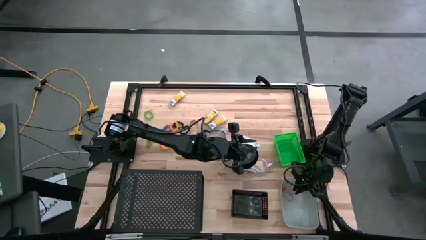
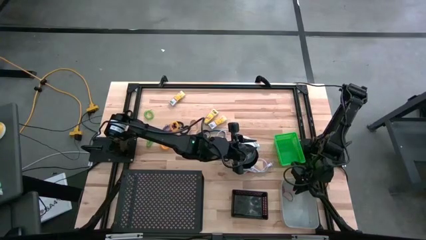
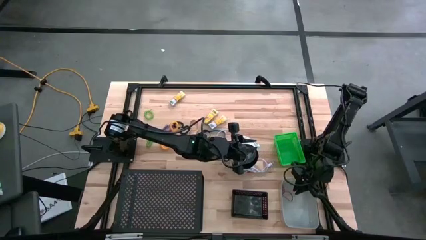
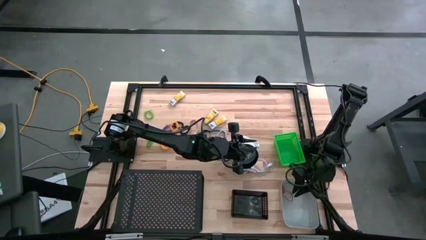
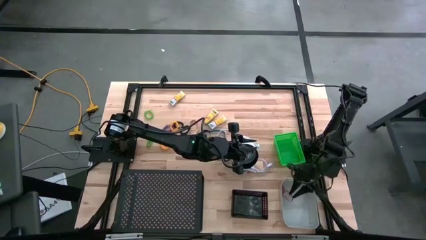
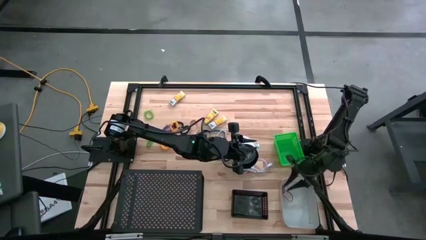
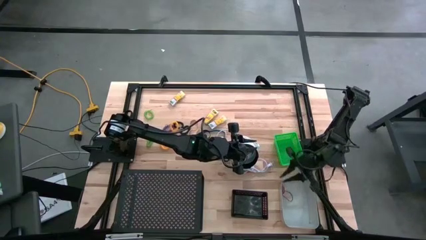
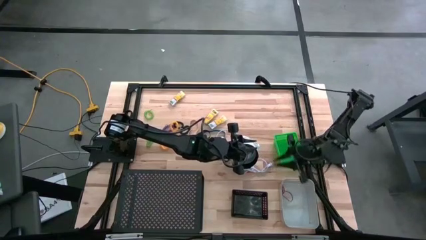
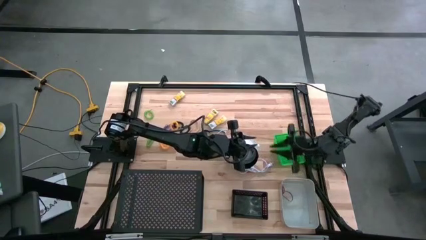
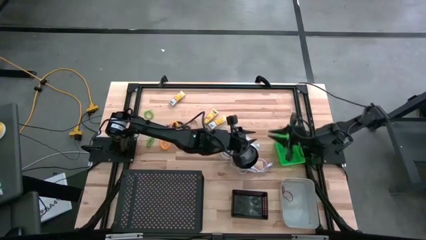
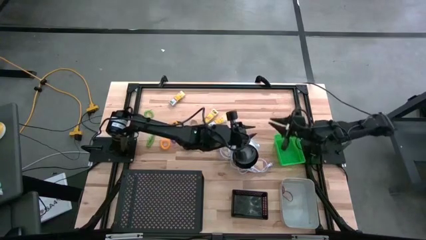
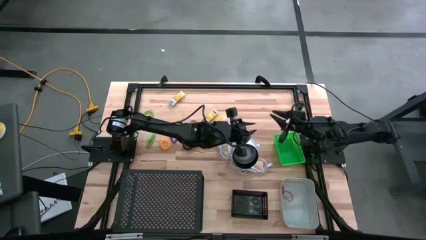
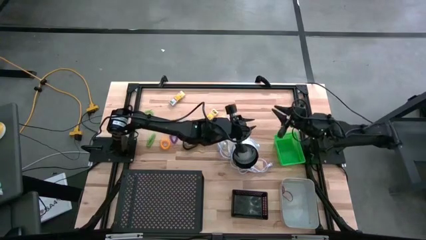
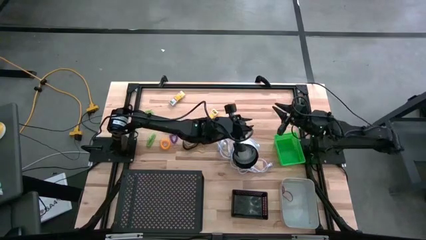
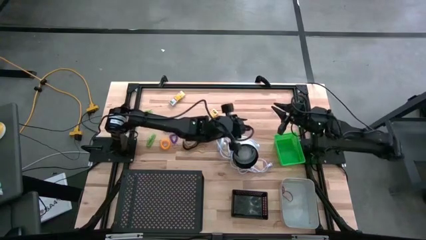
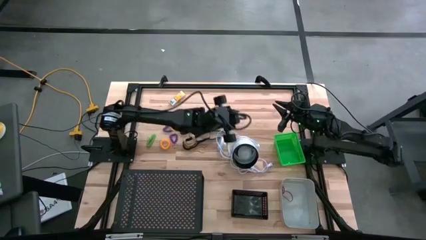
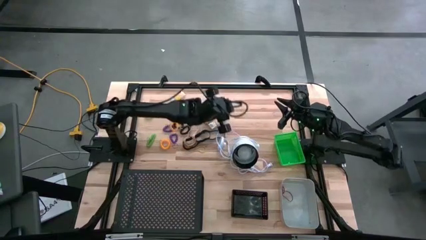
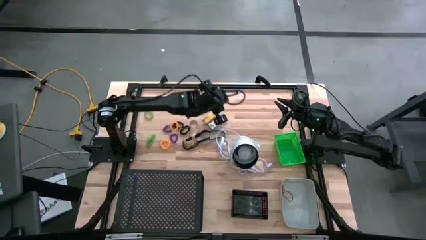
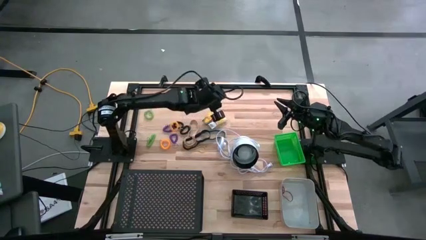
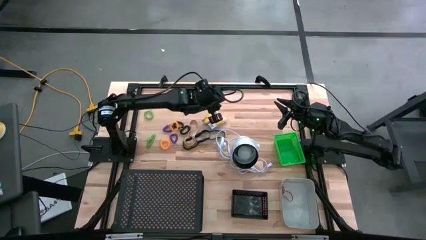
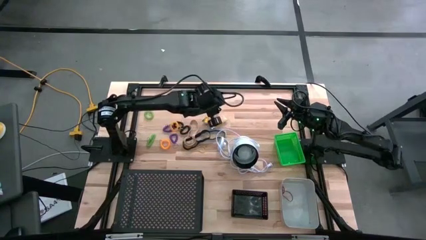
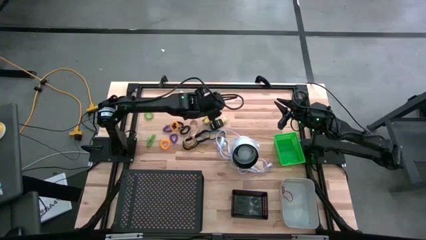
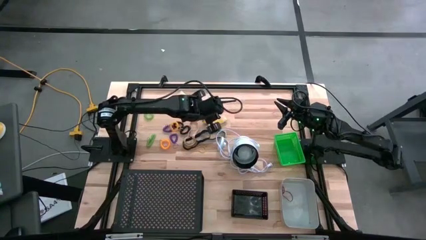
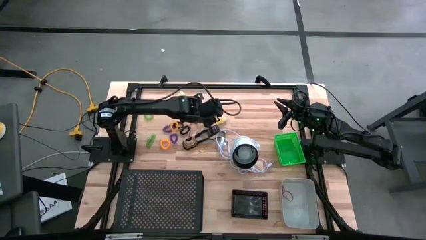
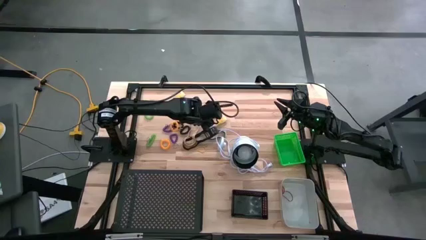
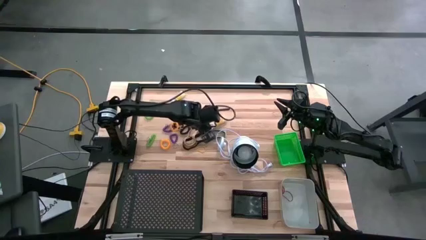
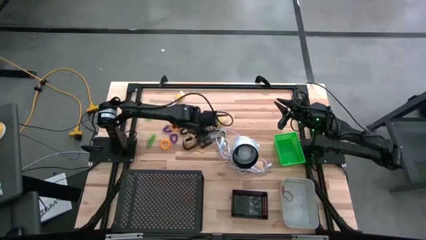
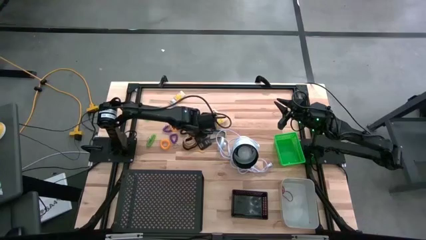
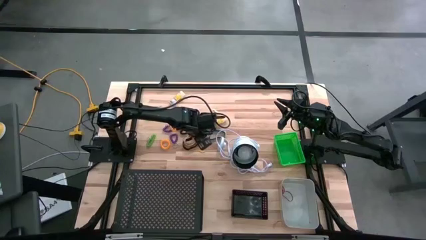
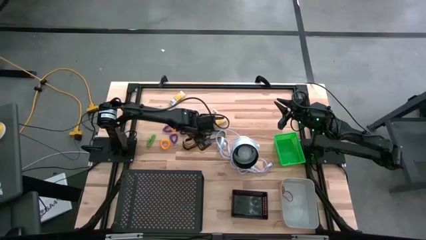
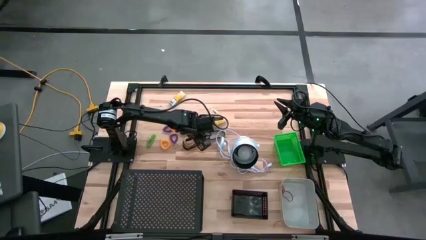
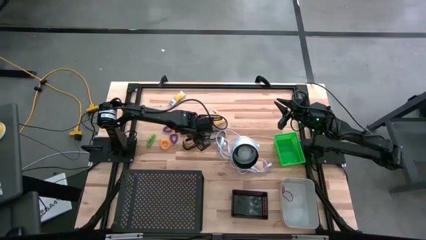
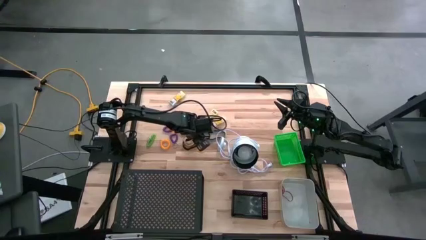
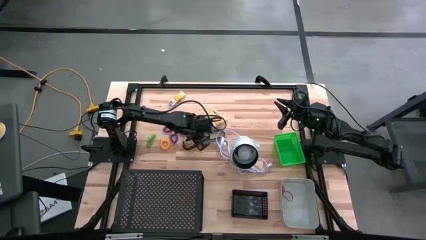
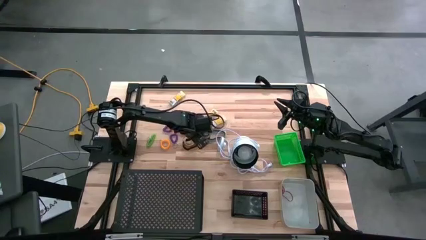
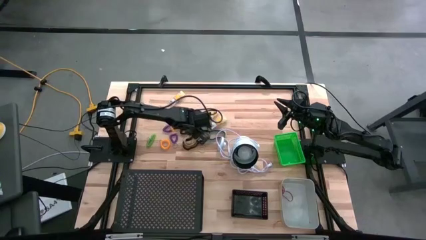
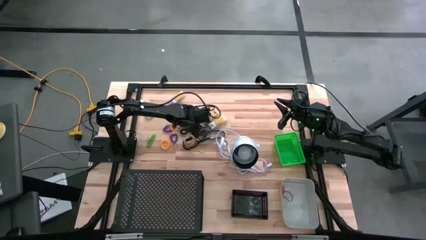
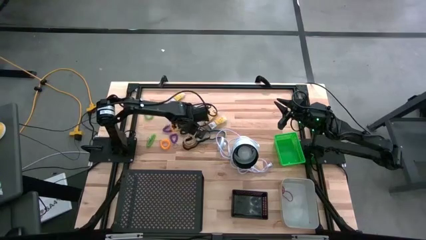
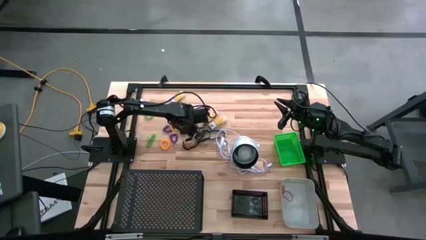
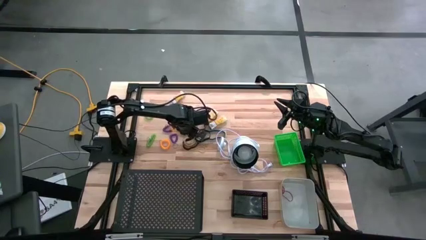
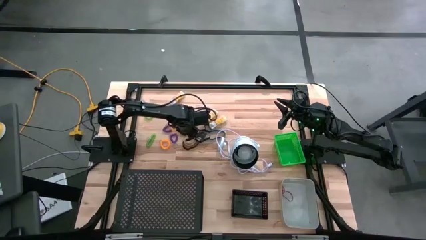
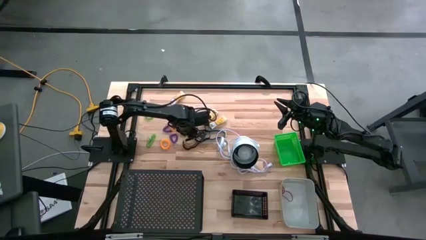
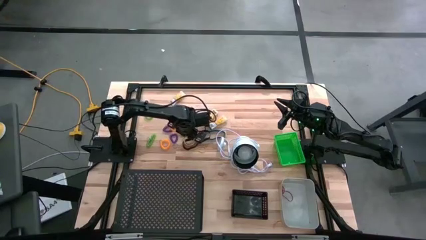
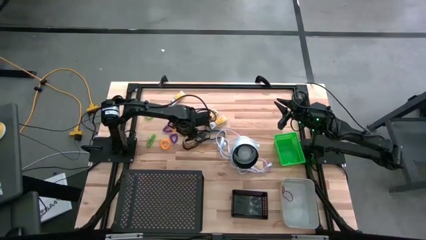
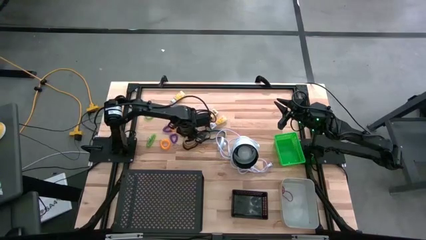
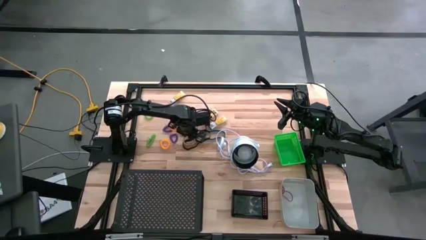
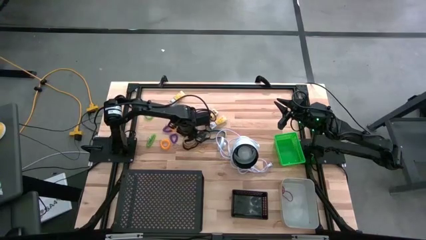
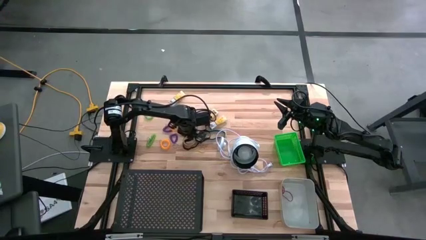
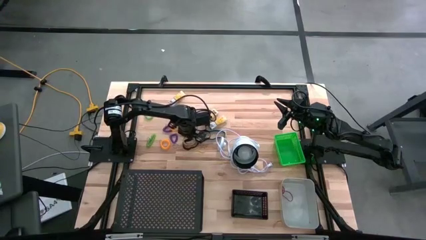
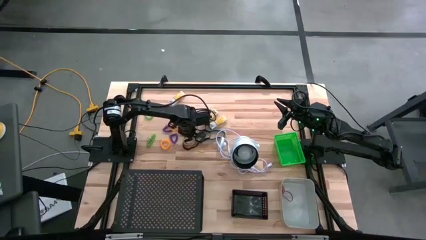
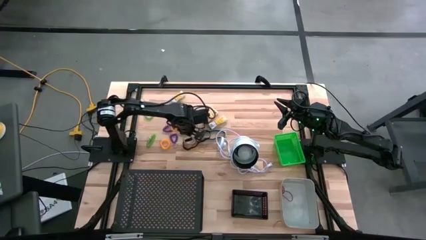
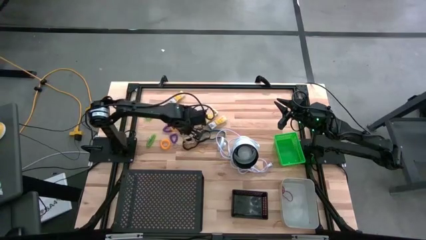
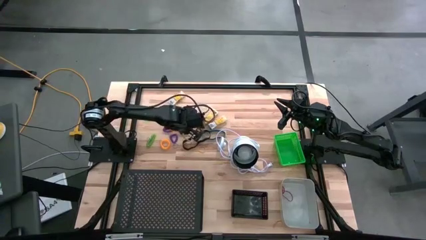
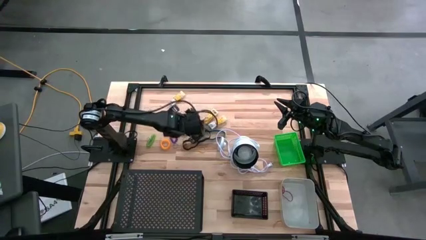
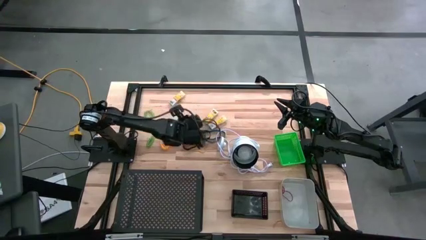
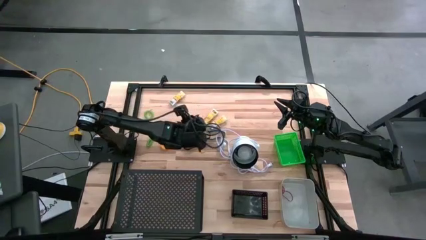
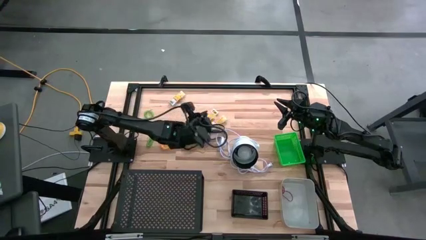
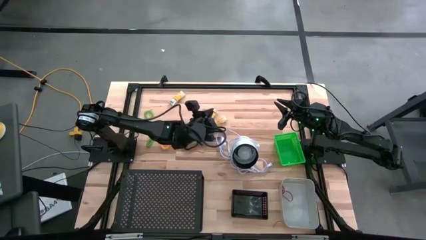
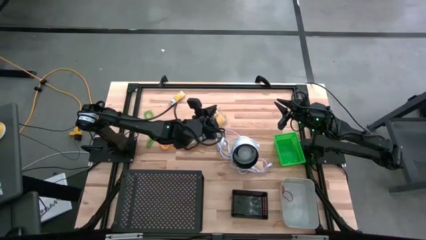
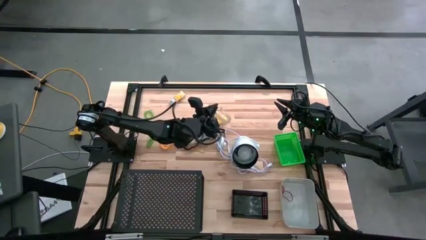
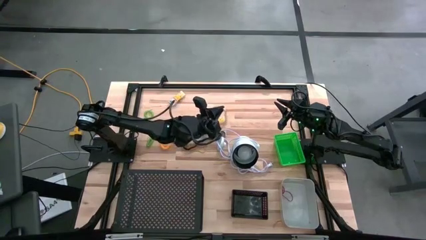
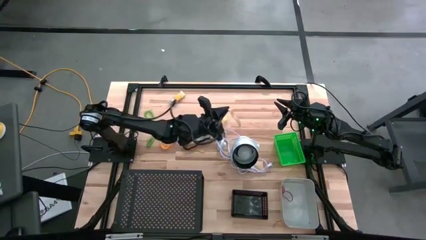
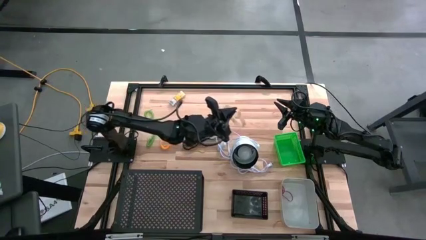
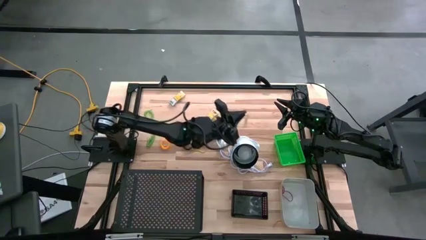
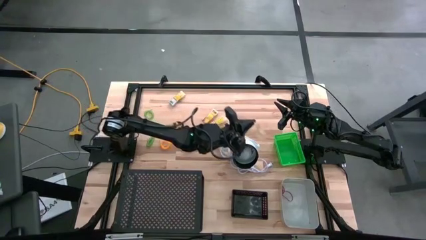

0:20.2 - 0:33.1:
Task: Pick & Place Office Desk Supplies
Put the light brown rubberband into the gray bin
